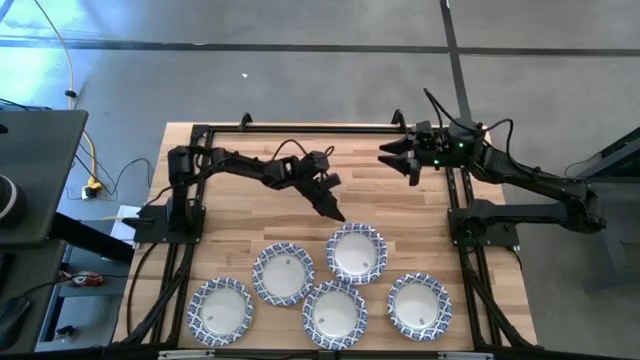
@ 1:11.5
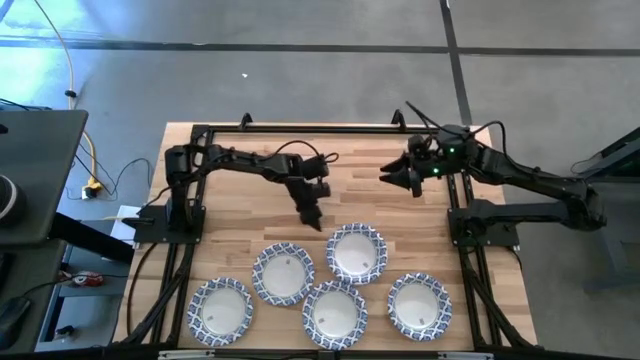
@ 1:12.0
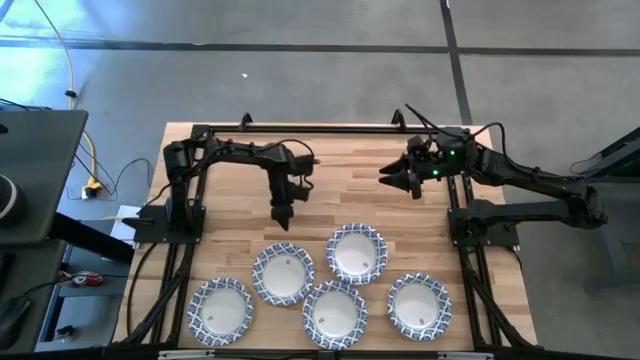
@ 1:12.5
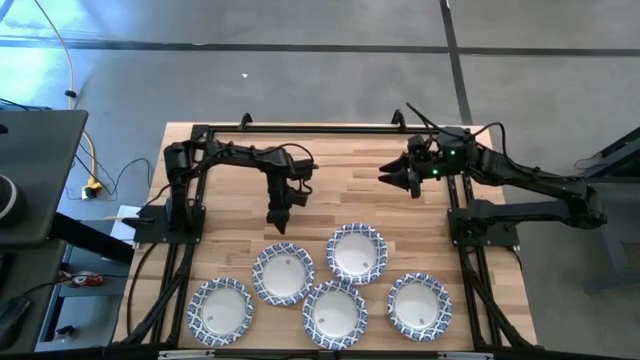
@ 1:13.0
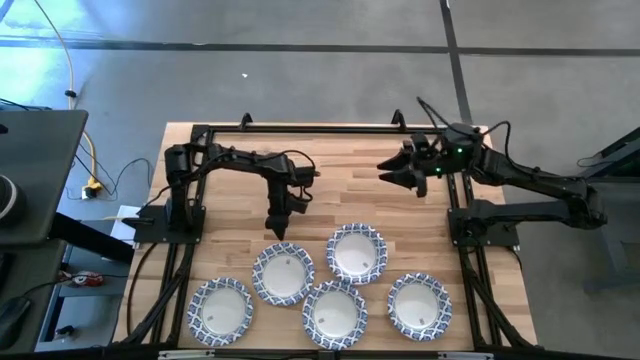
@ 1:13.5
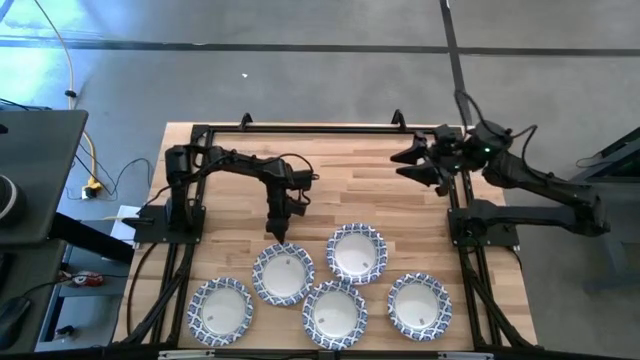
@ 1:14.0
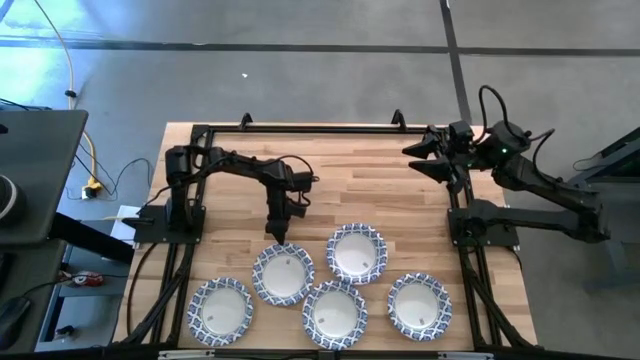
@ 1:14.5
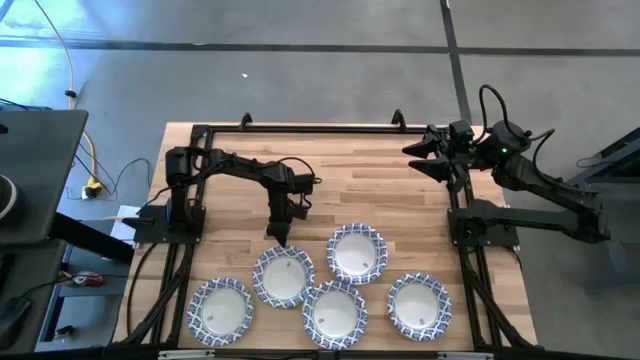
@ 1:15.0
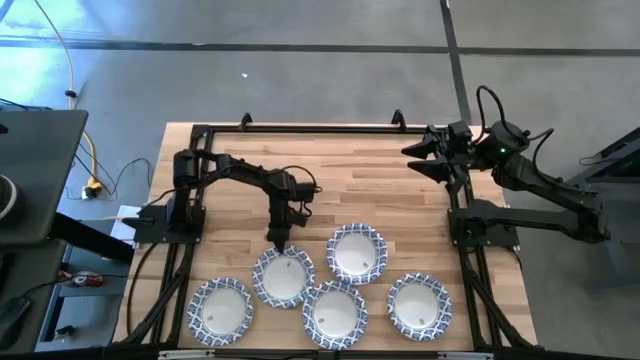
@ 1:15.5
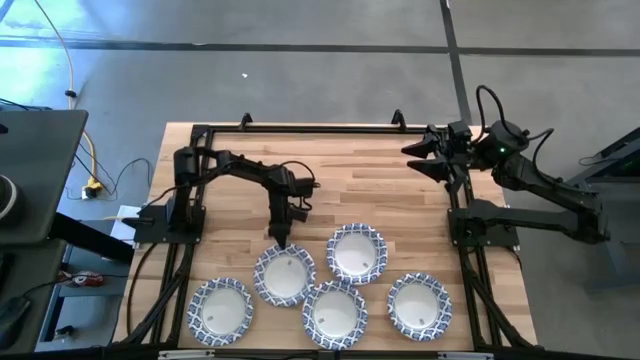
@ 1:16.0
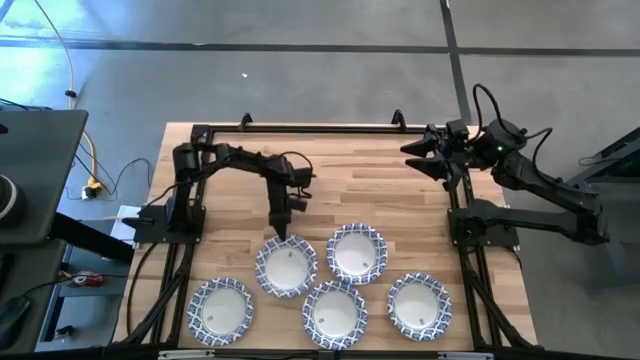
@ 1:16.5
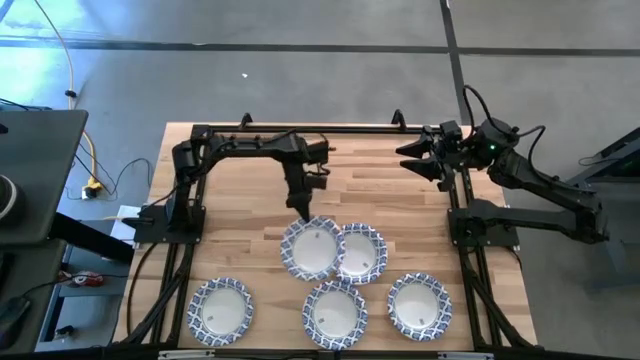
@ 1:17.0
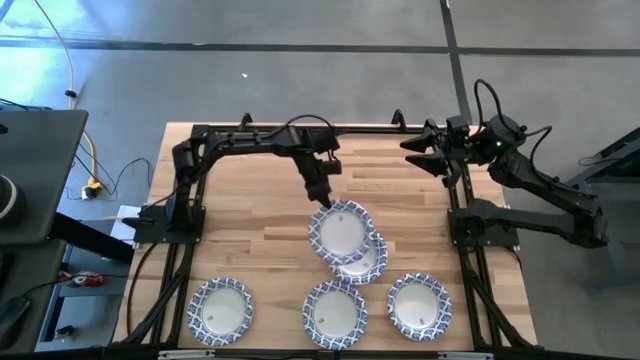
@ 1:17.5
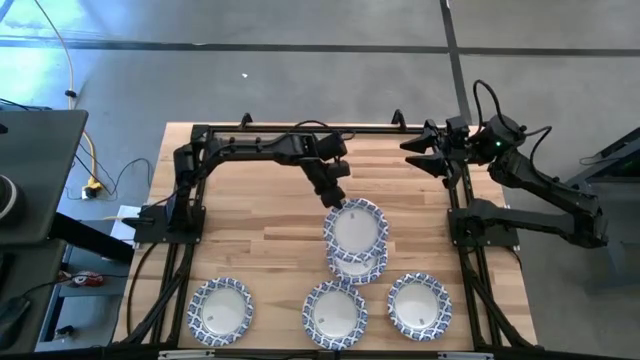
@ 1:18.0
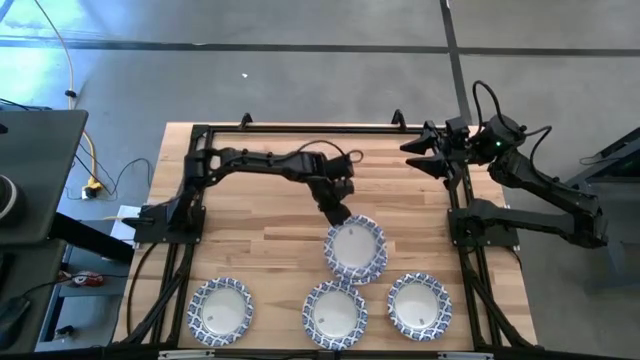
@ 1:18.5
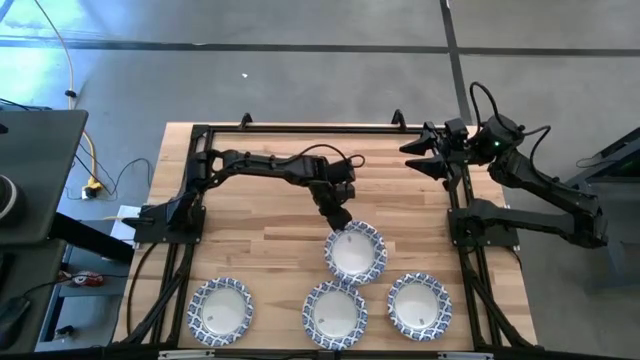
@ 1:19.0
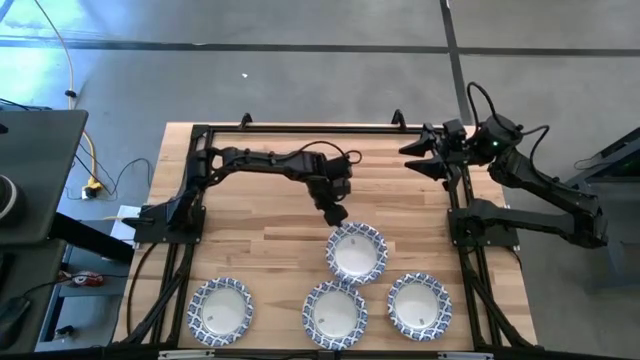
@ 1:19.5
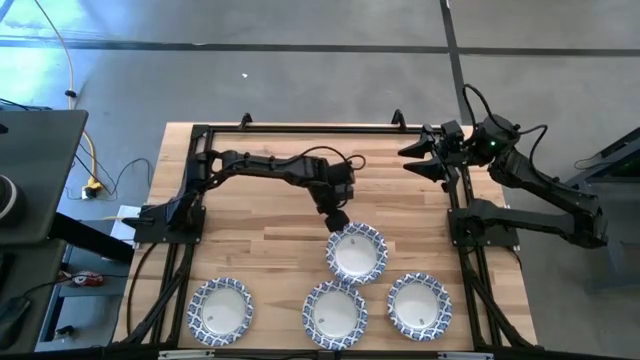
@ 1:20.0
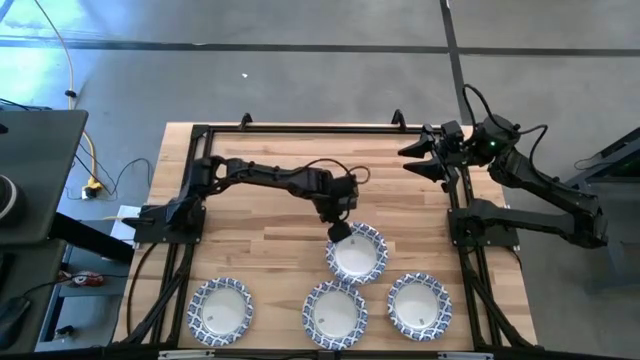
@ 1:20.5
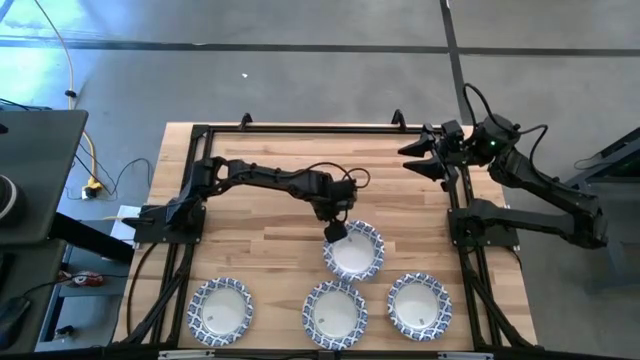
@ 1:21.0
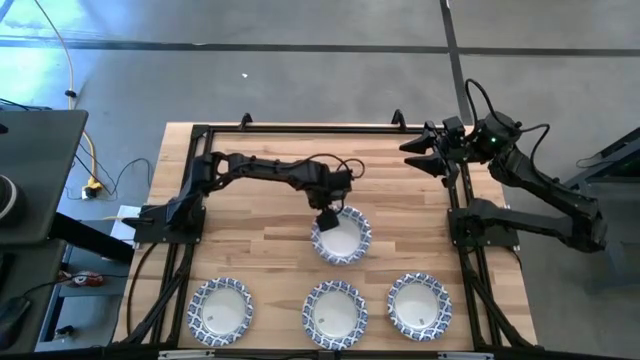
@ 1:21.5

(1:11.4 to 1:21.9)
Task: Nest bowls inside each other
Stack the white patterned bowl on top of the other white patterned bowls

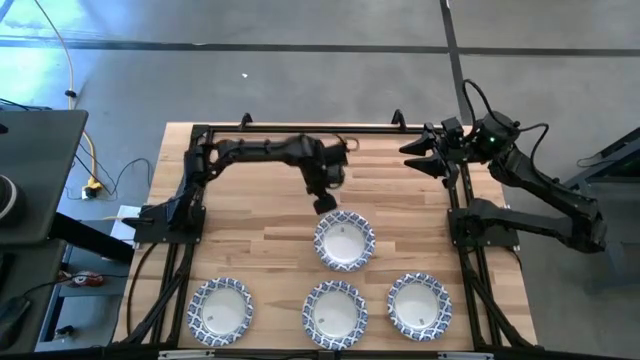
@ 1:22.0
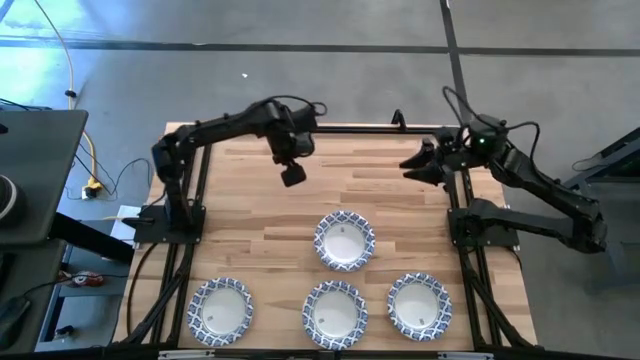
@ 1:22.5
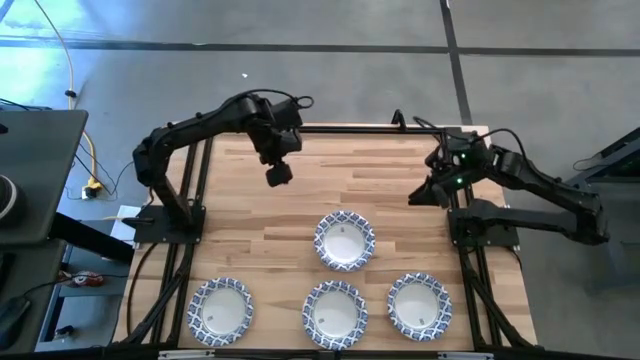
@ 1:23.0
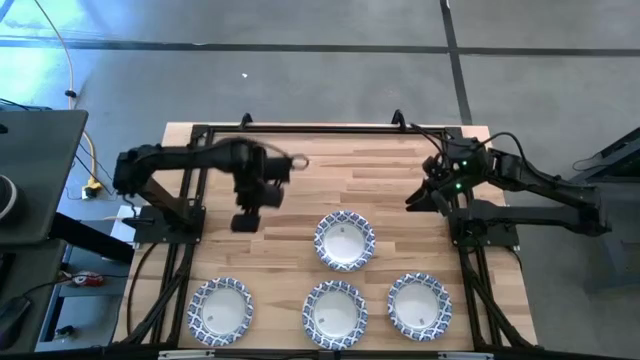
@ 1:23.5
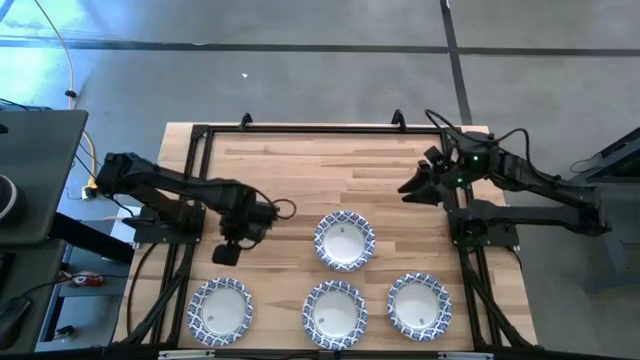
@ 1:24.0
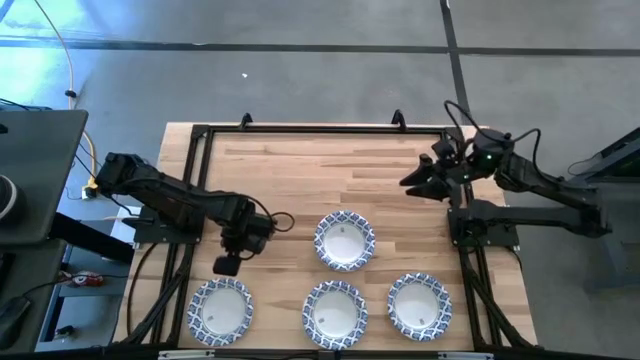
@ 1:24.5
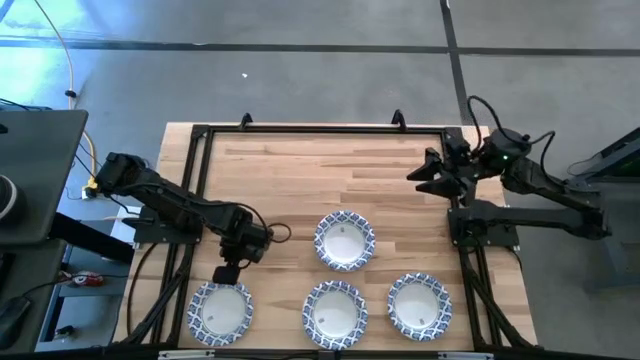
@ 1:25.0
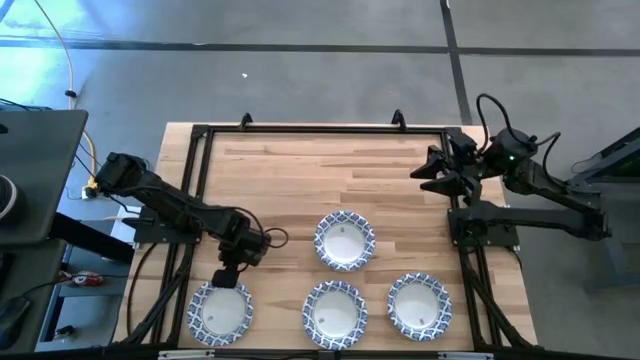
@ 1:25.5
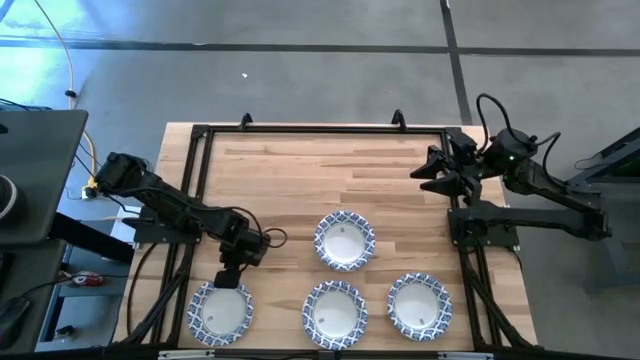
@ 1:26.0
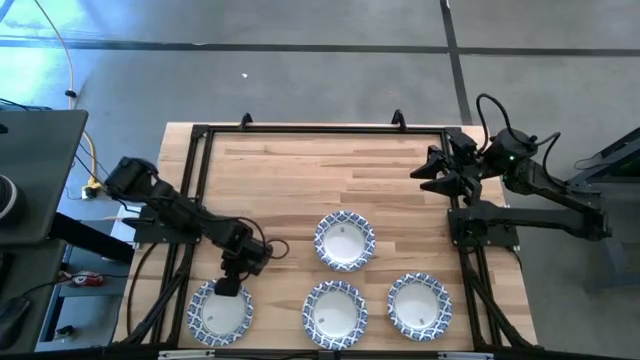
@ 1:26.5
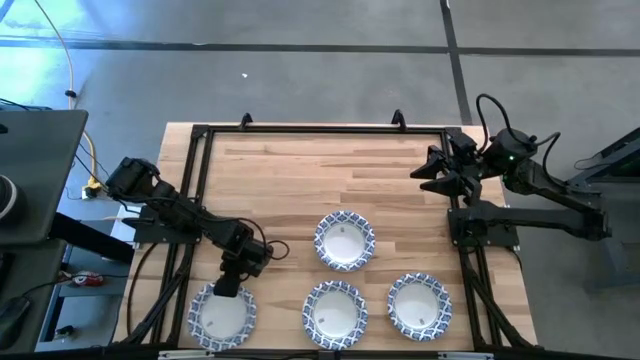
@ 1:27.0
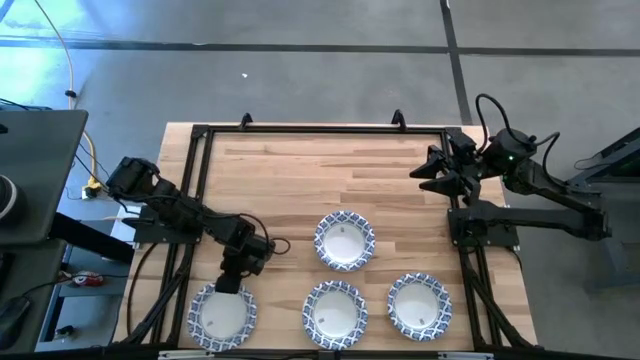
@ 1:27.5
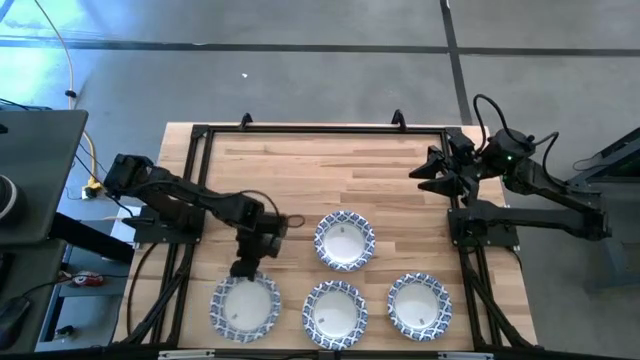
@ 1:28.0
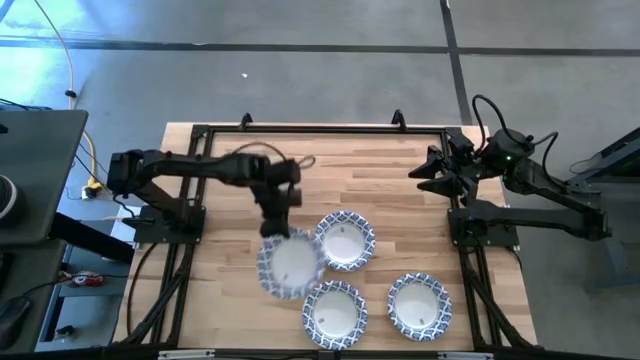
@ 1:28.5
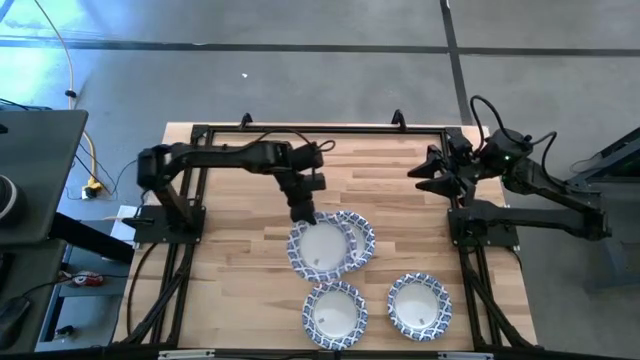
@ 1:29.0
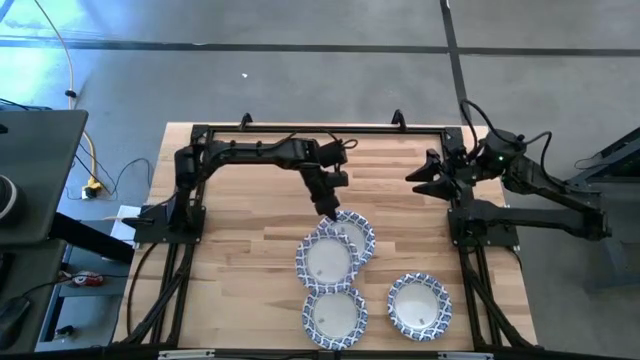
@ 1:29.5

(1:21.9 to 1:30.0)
Stack the white patterned bowl on top of the other white patterned bowls

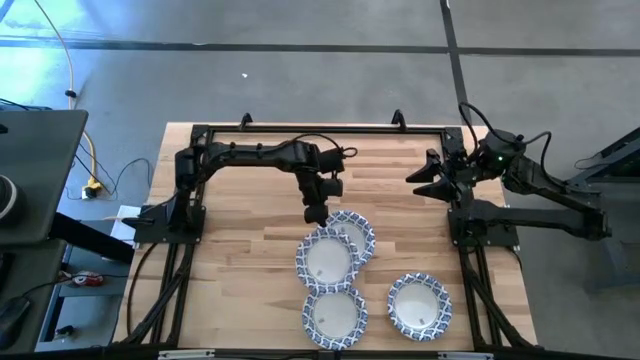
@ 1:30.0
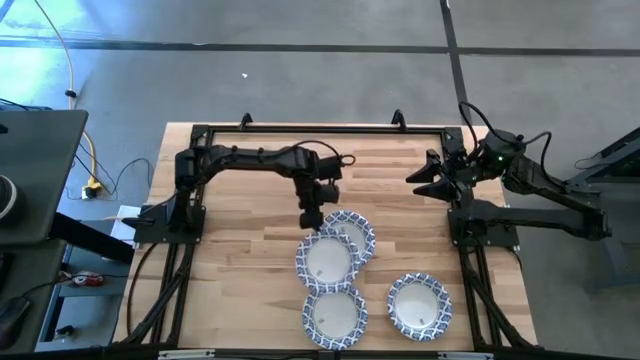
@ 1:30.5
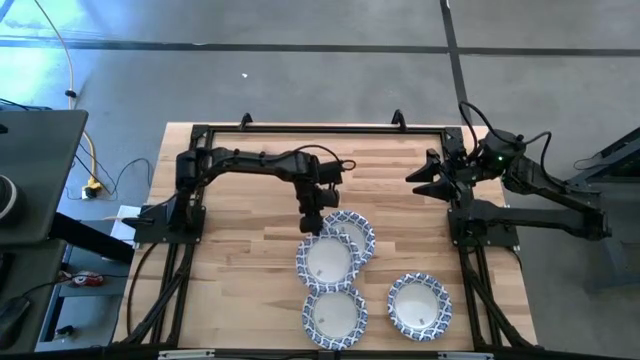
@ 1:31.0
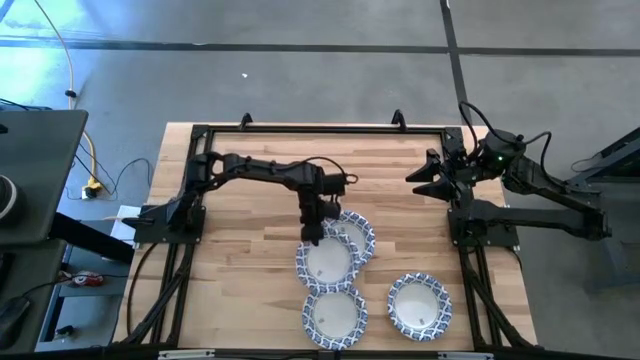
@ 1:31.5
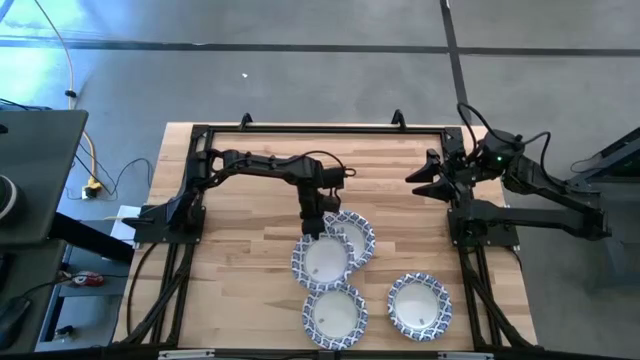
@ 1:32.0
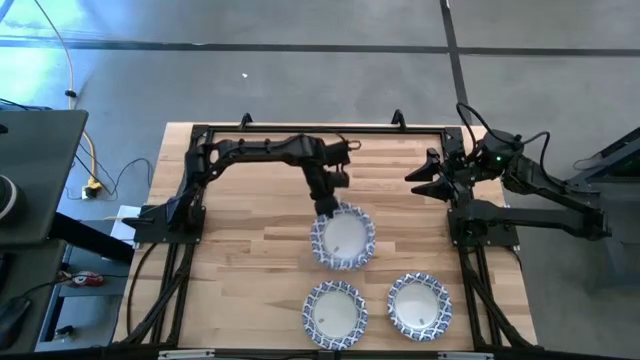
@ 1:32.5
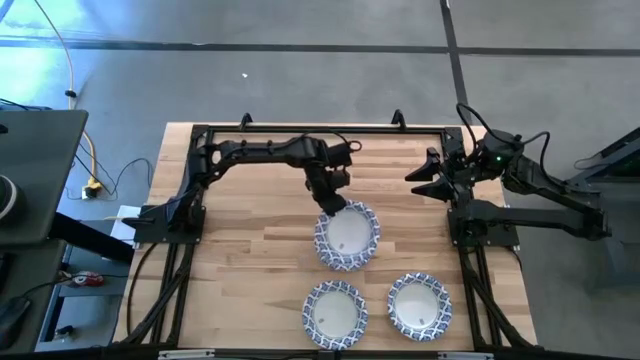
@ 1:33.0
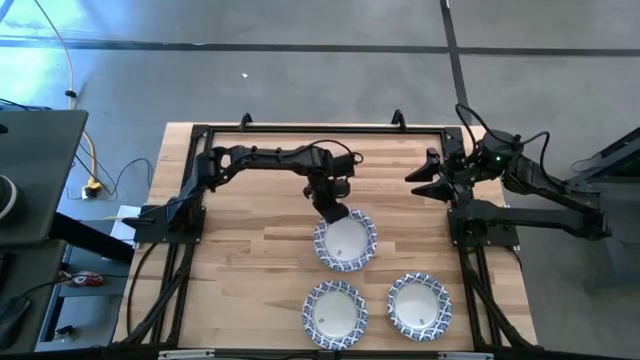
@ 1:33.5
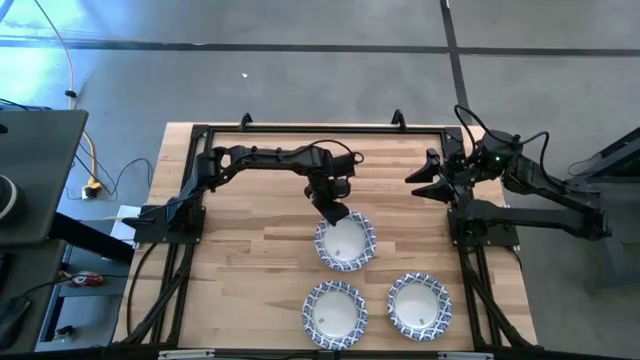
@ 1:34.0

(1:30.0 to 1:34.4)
Stack the white patterned bowl on top of the other white patterned bowls
